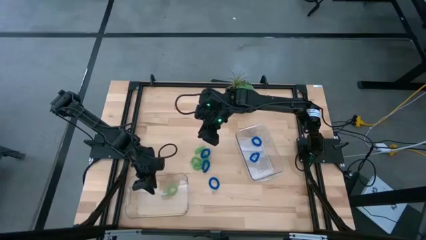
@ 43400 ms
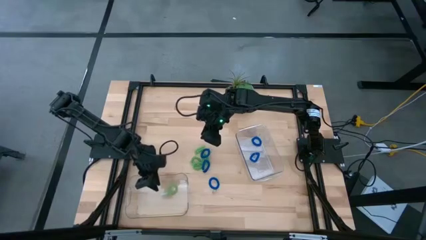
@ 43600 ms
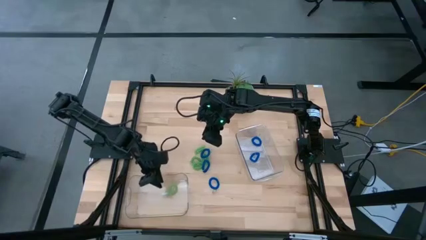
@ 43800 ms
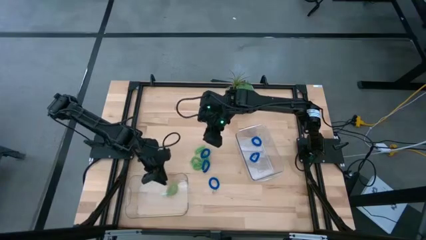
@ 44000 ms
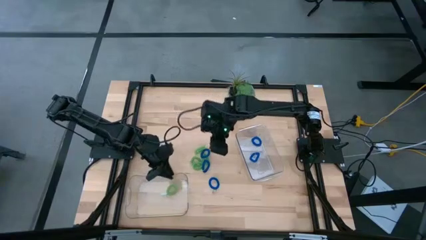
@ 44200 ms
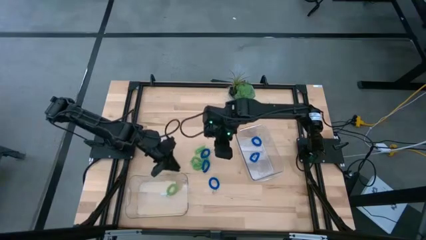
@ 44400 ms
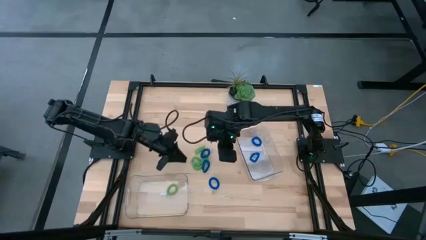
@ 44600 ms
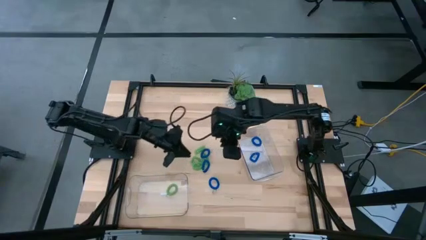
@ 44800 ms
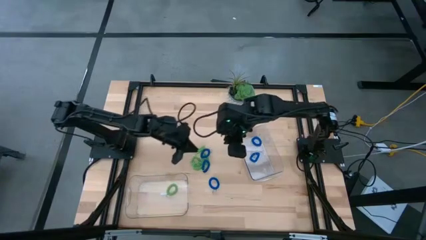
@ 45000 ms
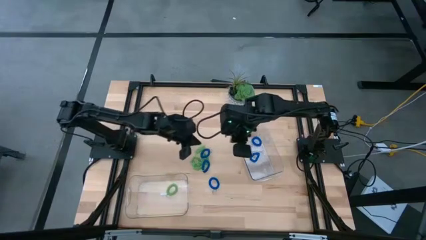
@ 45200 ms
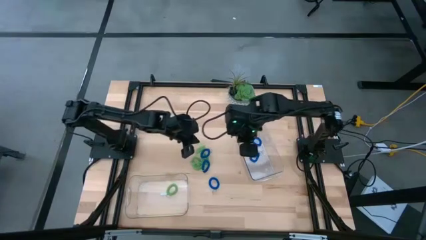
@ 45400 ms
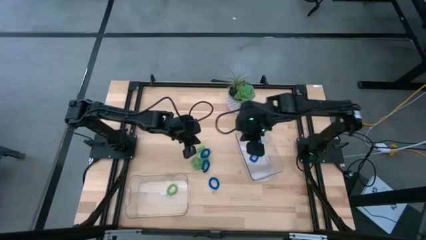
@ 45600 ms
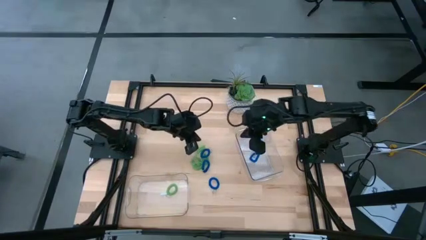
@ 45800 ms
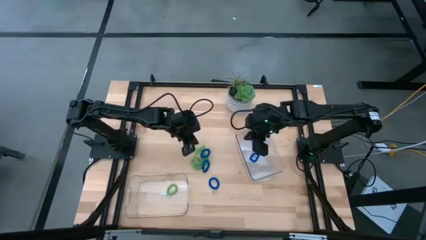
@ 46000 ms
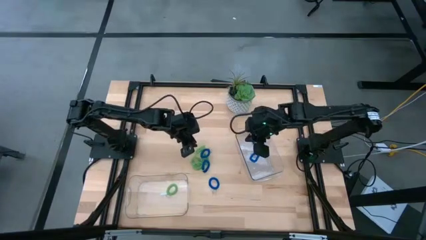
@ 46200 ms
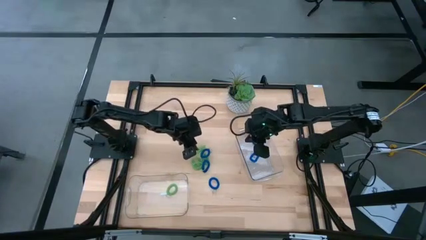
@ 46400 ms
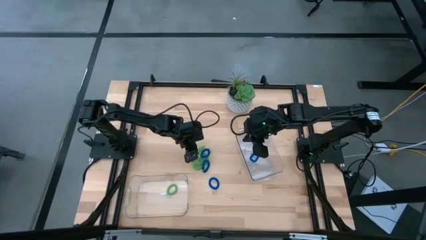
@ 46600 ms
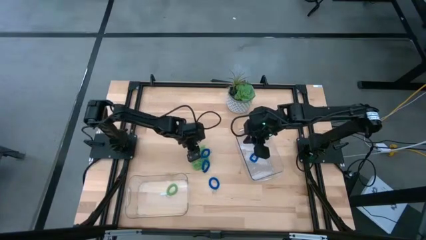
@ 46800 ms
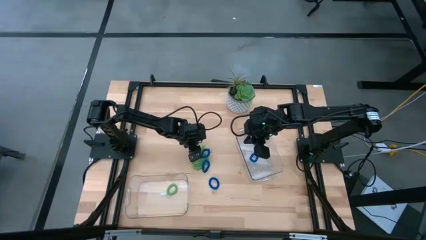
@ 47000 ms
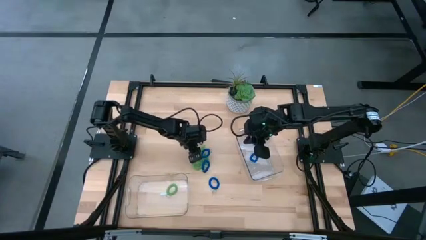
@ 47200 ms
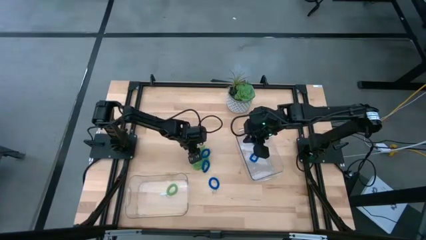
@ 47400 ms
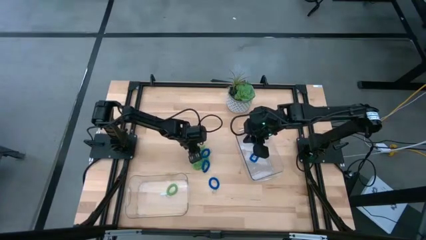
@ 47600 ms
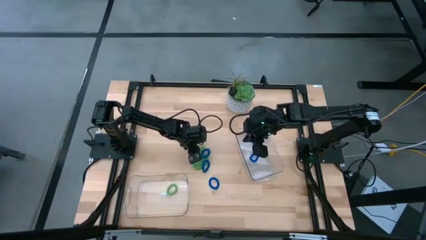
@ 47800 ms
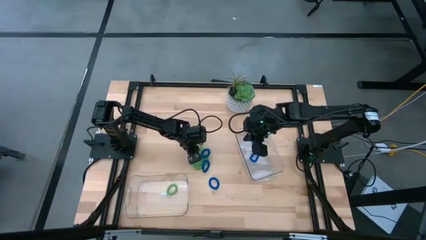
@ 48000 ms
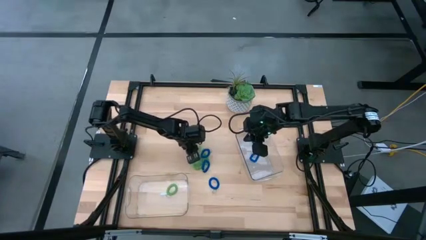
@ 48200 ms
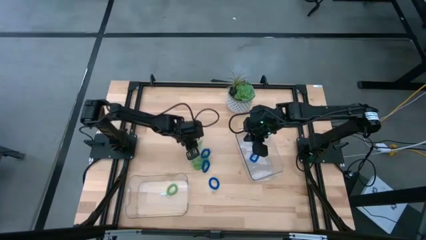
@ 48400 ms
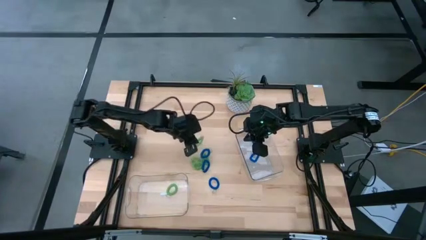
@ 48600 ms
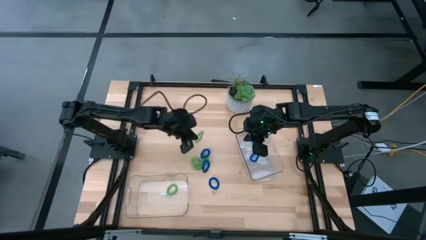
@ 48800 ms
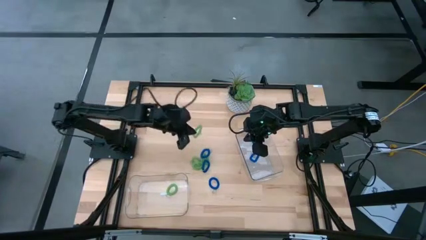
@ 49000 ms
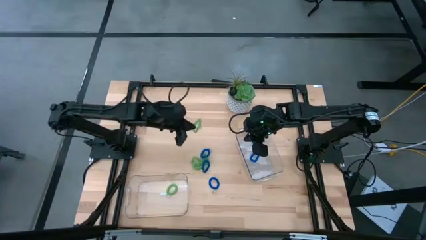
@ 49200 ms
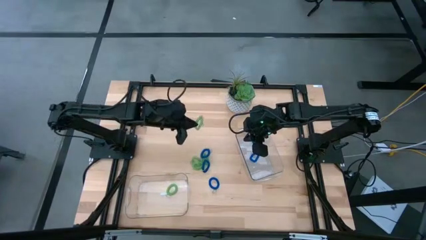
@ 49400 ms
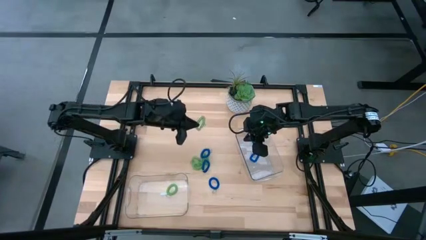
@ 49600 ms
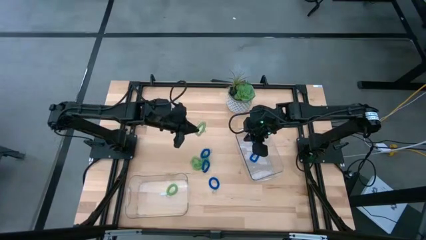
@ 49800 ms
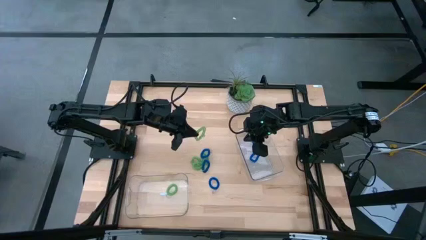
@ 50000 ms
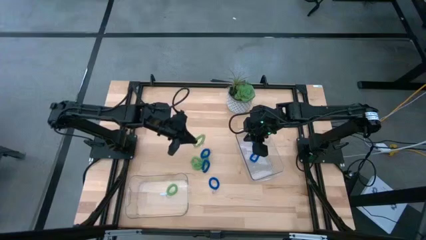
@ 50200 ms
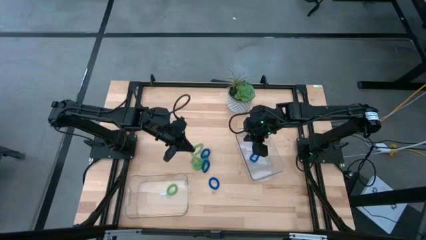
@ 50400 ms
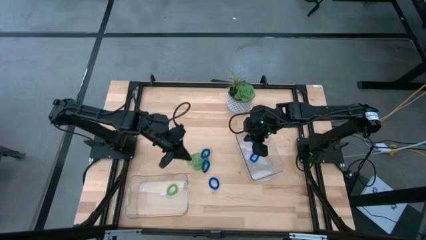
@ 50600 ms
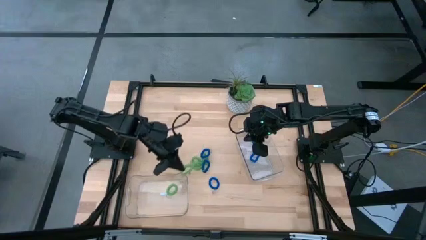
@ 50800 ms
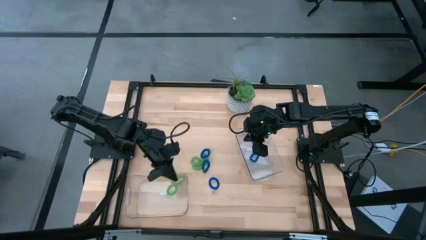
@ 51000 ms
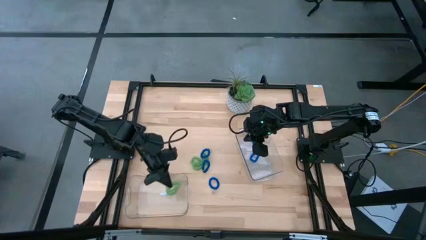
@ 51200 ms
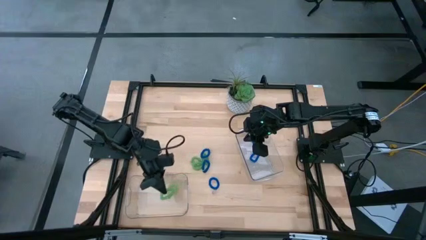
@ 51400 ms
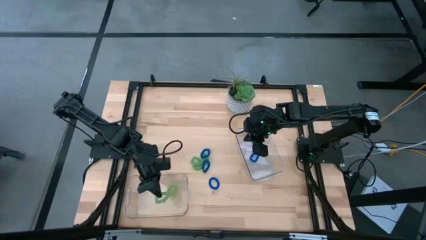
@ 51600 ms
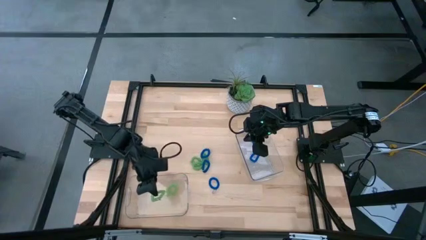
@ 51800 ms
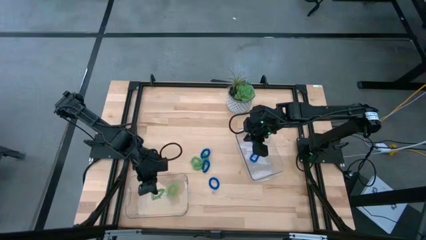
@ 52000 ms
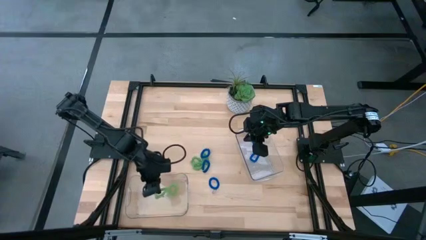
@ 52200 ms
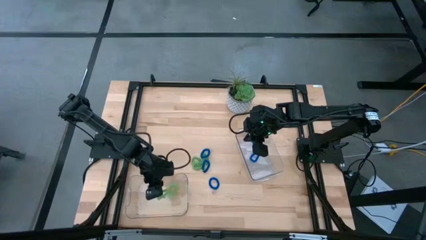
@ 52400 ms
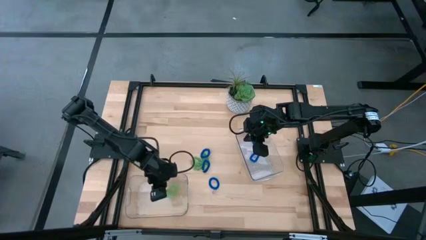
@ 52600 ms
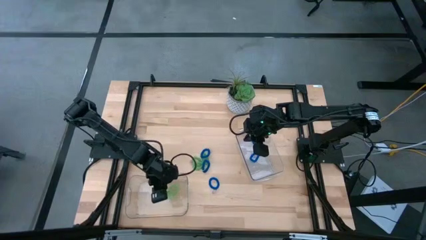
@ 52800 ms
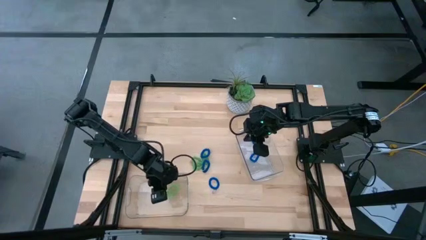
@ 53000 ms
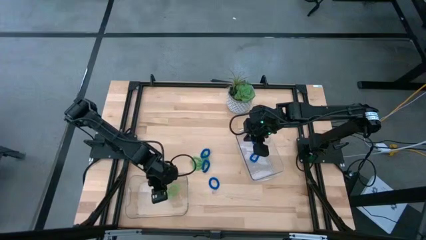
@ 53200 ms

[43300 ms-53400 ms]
Task: Sort spring keychains
Put the green spring keychain into the left transparent bin

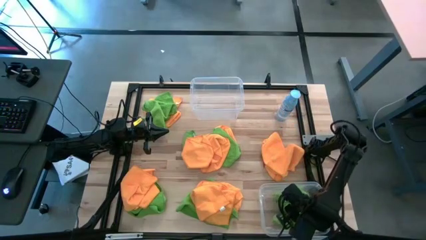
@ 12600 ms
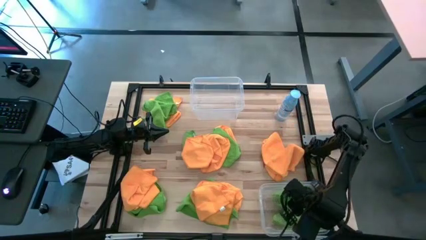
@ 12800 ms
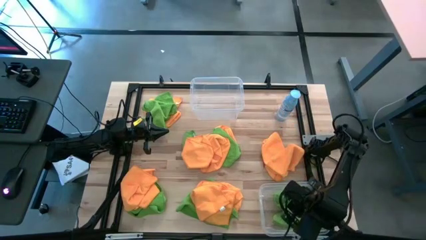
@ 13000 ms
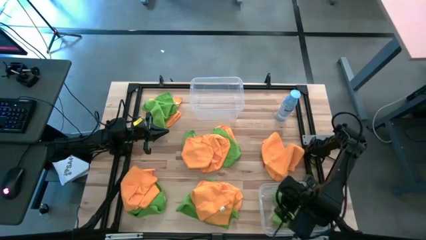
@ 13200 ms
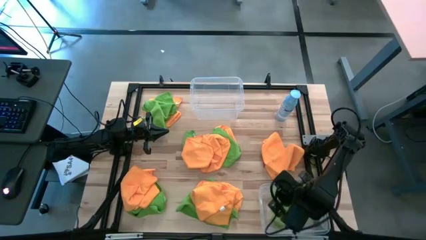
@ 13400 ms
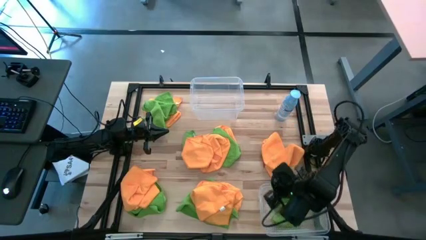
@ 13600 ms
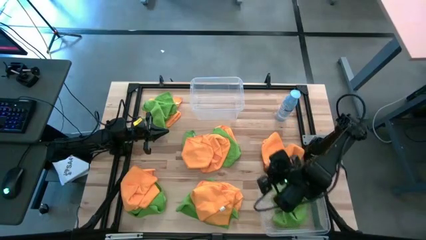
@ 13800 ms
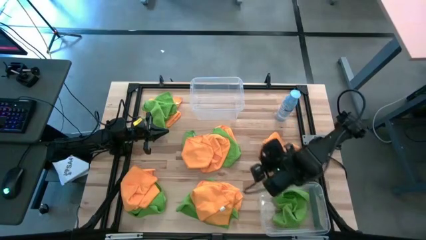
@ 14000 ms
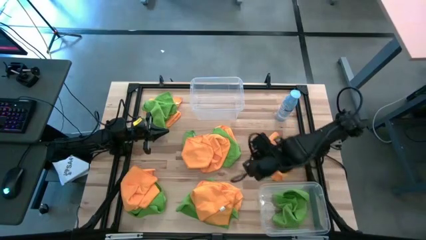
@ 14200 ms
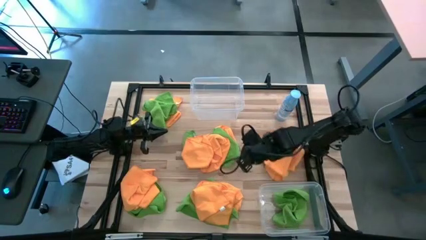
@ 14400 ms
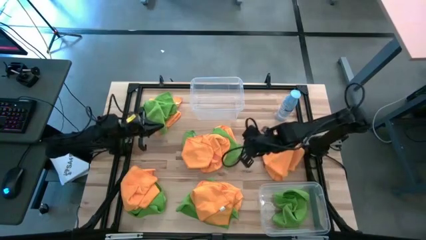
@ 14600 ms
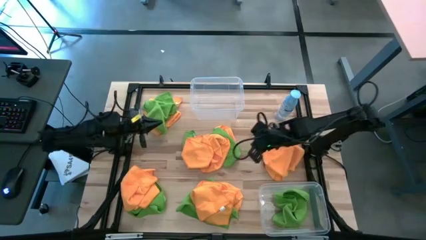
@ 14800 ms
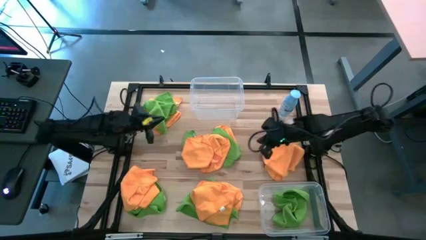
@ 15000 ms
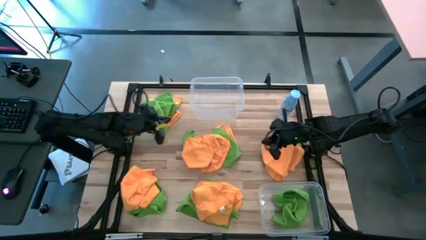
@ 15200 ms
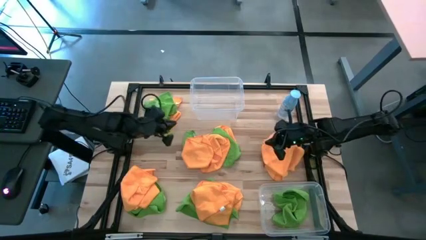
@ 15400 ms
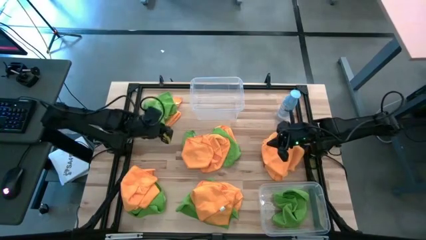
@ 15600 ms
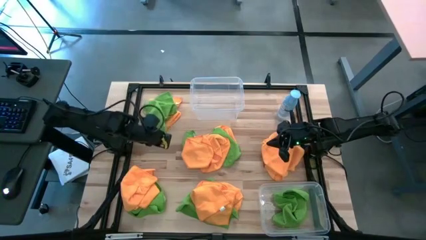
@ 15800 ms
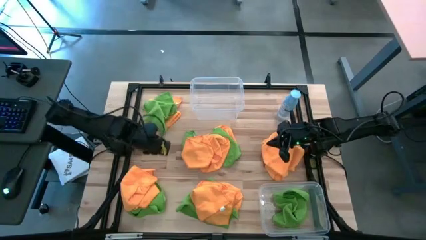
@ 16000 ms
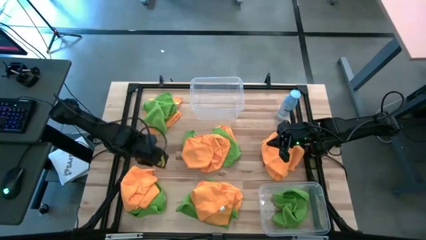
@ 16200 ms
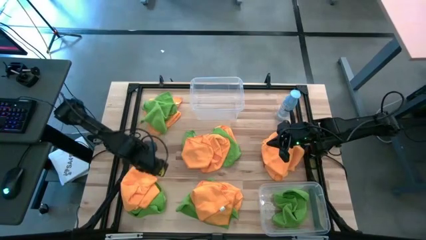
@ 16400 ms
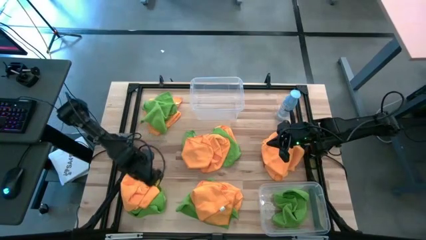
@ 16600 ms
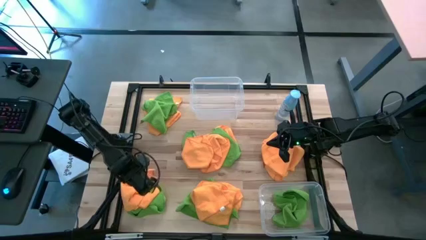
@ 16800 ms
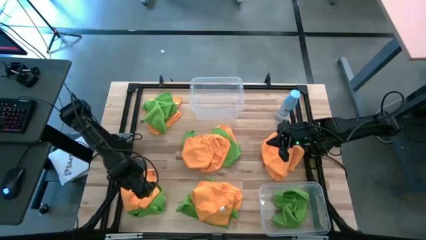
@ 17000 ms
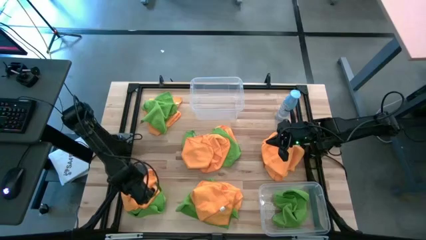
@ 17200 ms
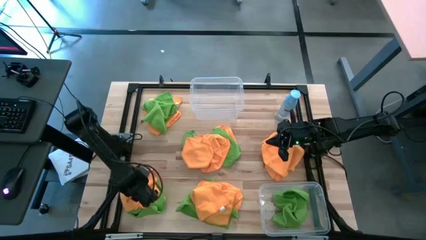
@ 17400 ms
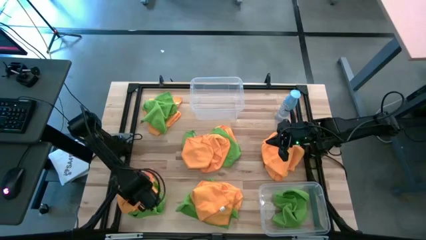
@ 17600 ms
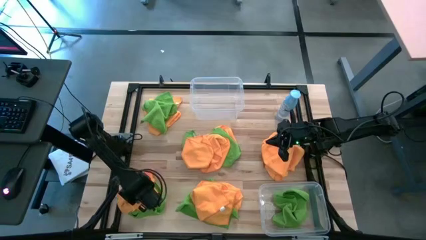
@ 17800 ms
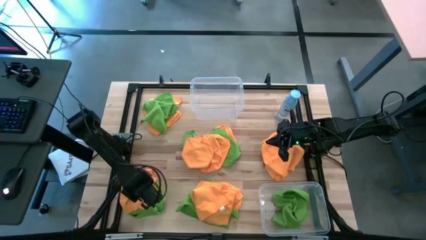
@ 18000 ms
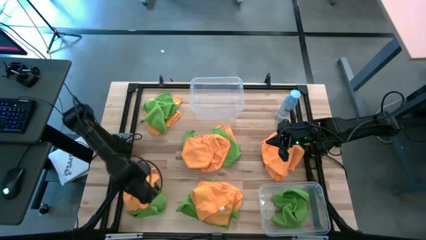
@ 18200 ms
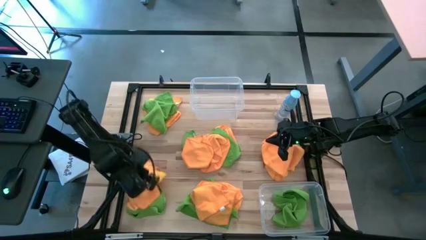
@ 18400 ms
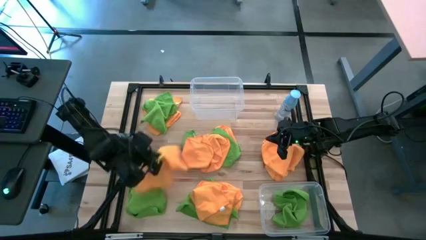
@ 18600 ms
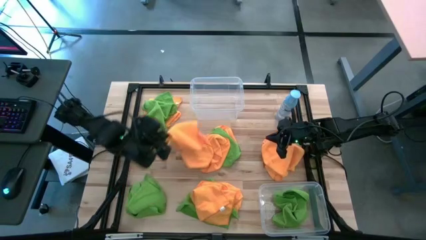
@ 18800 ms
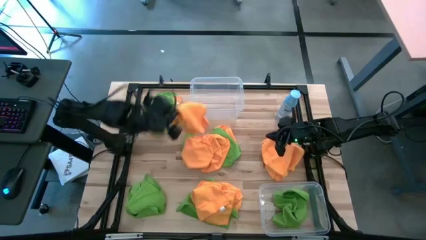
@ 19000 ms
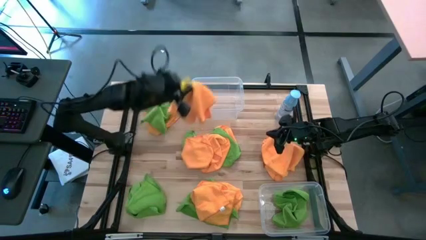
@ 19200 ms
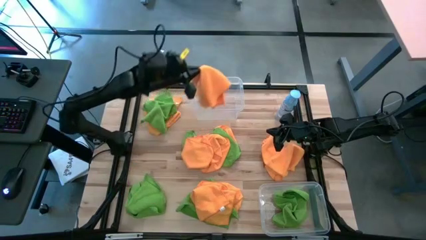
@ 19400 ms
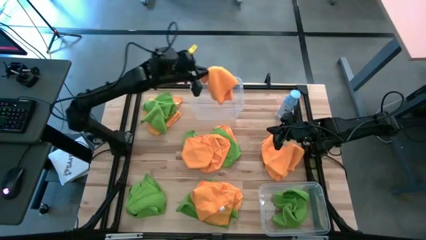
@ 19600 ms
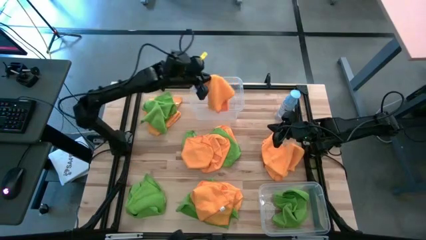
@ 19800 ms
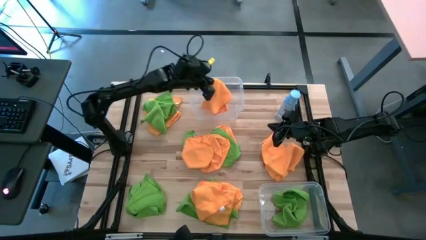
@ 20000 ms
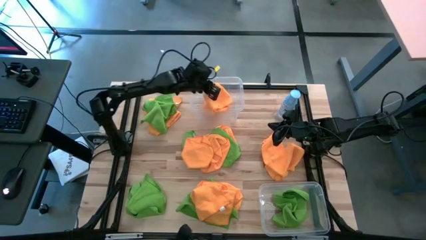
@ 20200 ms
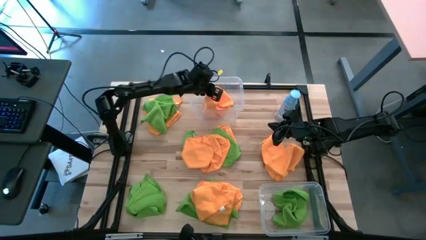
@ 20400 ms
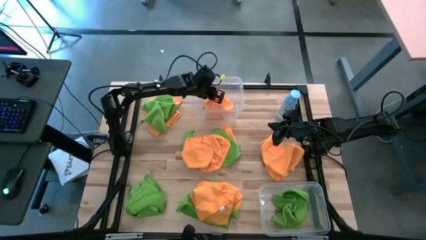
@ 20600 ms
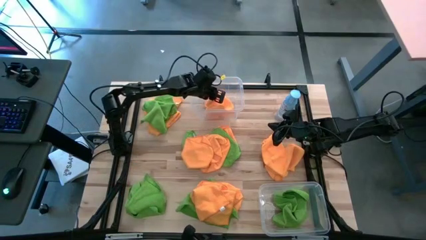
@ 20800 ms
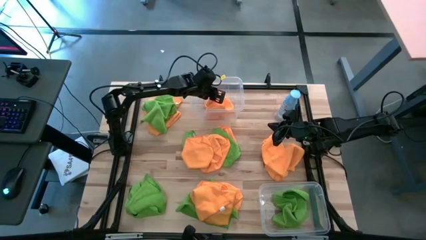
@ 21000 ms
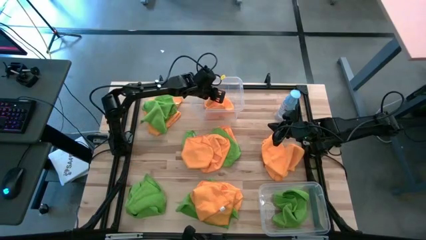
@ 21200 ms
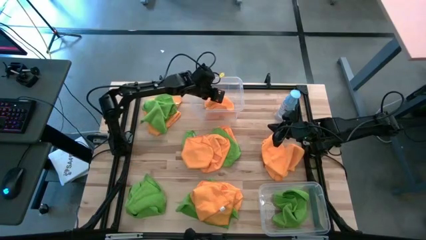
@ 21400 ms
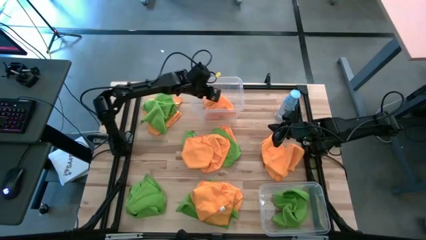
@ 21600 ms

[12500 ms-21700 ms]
Task: Sort microfiber towel by color & place in baskets
Put the orange microfiber towel into the top transparent bin
